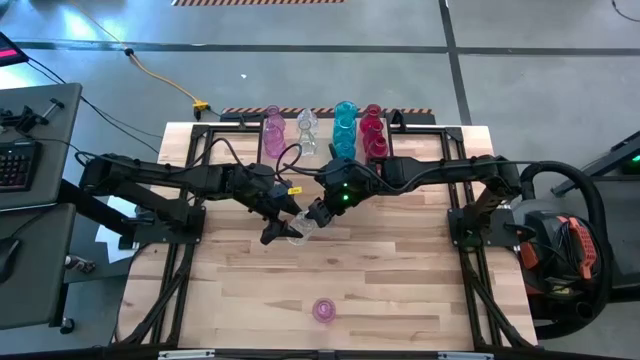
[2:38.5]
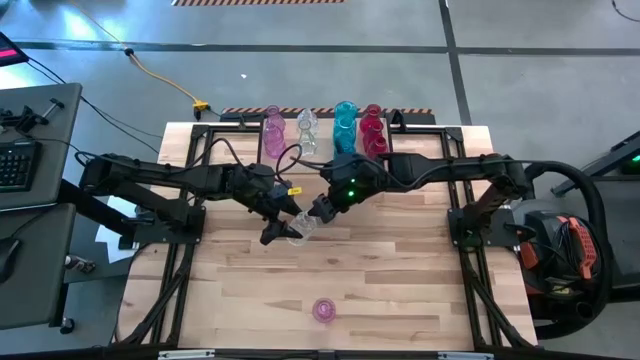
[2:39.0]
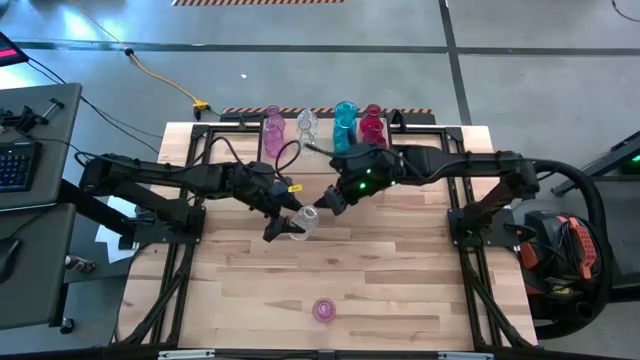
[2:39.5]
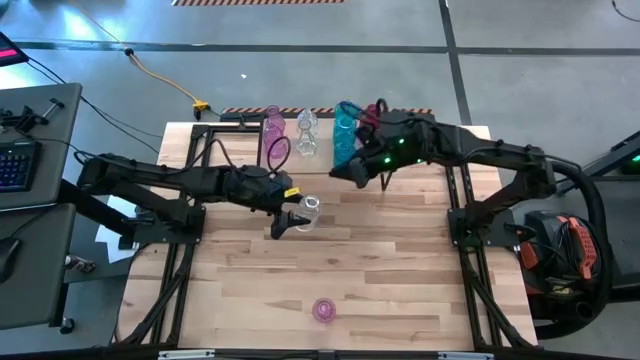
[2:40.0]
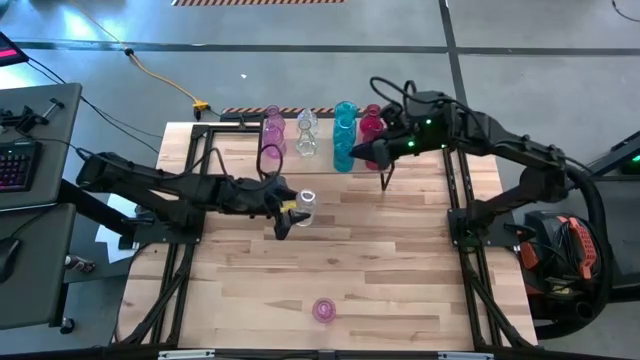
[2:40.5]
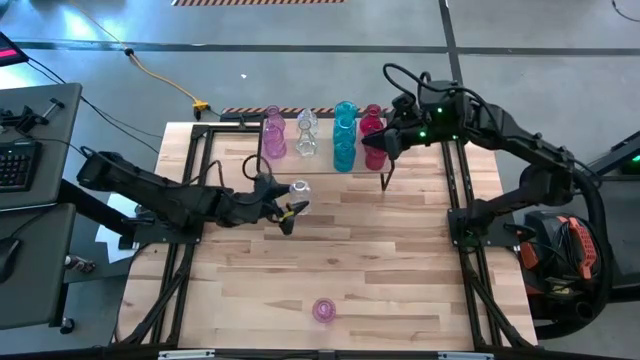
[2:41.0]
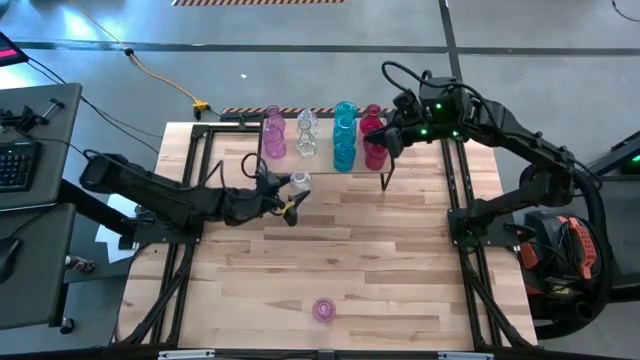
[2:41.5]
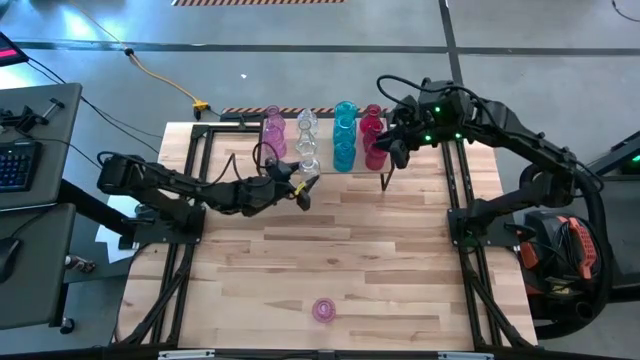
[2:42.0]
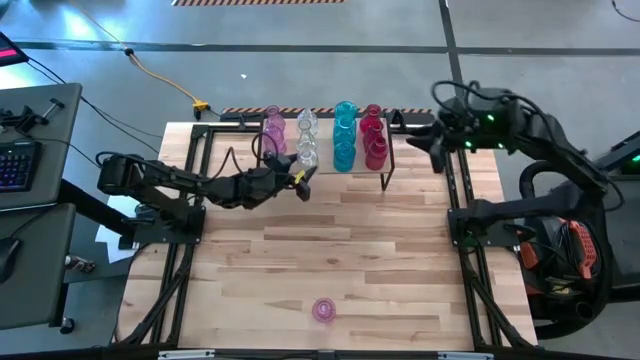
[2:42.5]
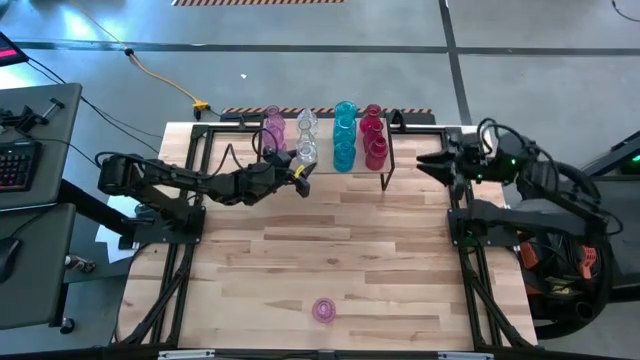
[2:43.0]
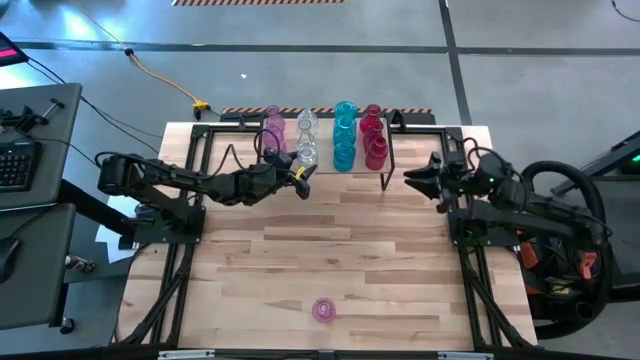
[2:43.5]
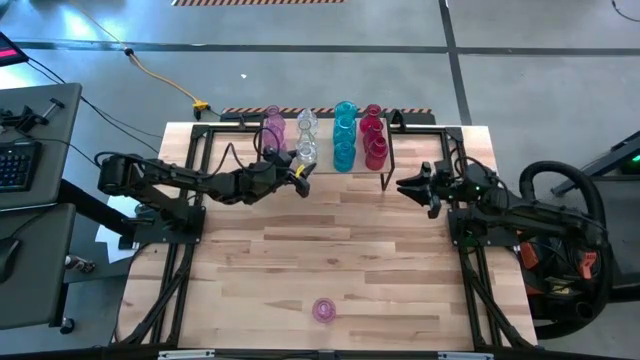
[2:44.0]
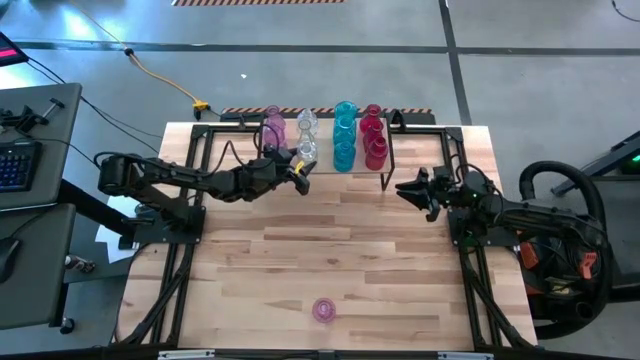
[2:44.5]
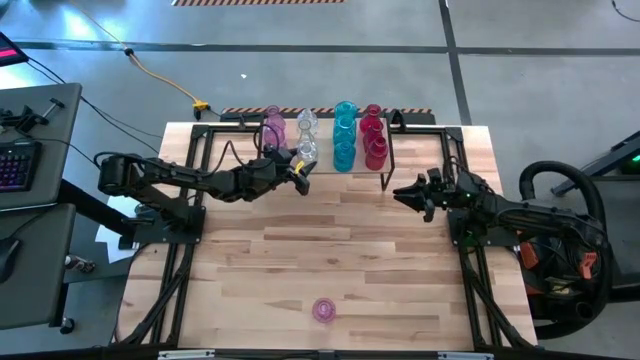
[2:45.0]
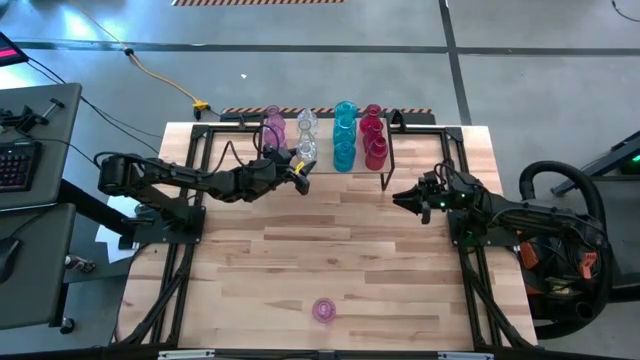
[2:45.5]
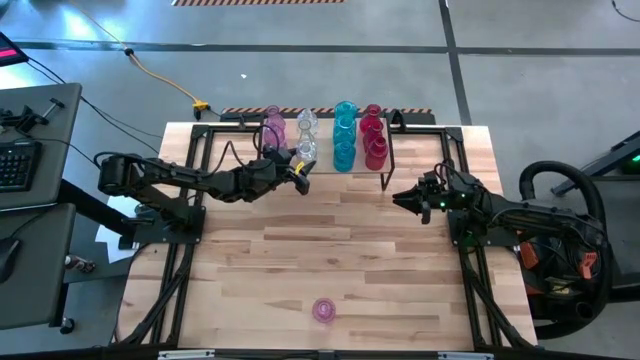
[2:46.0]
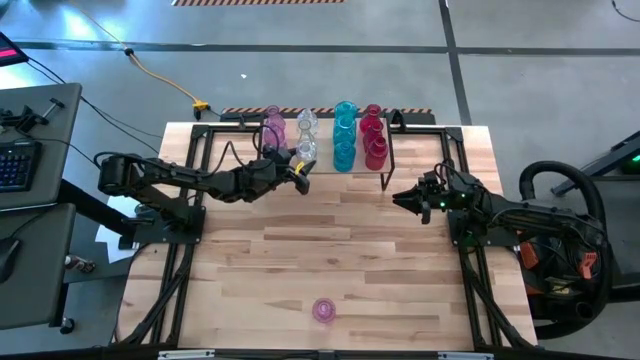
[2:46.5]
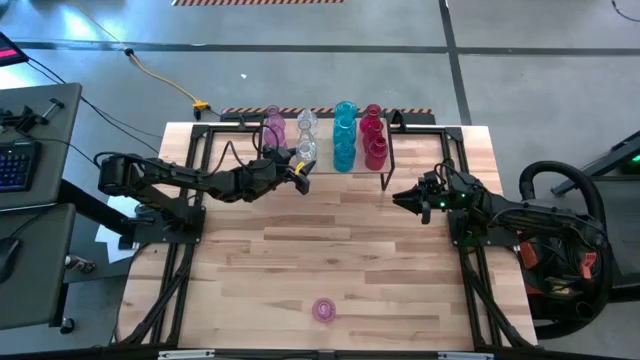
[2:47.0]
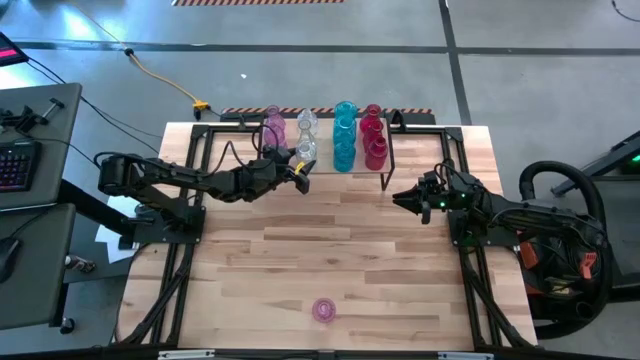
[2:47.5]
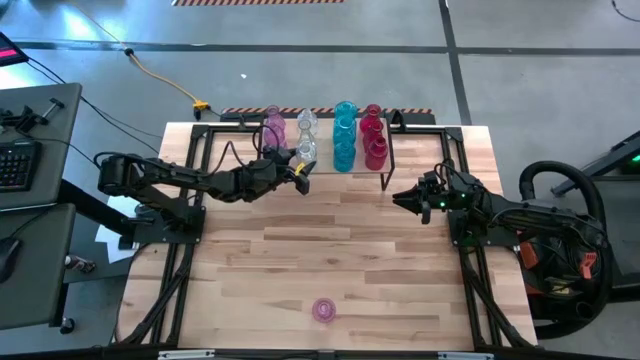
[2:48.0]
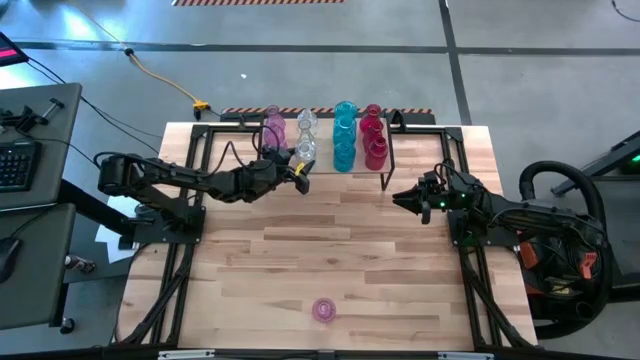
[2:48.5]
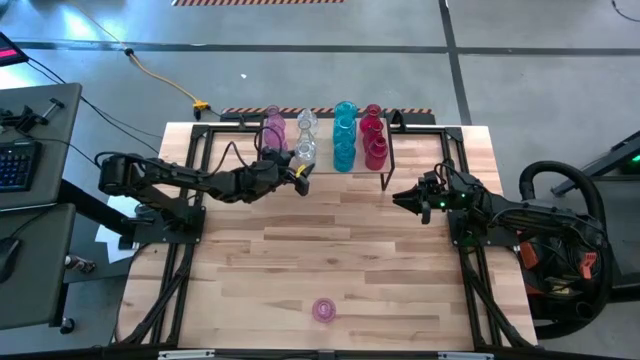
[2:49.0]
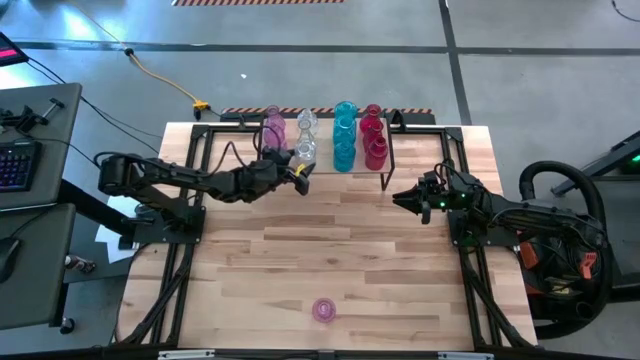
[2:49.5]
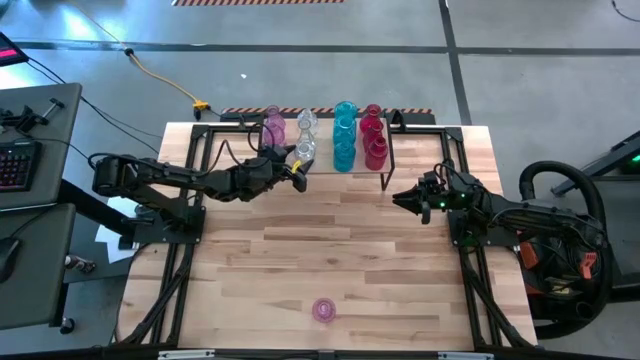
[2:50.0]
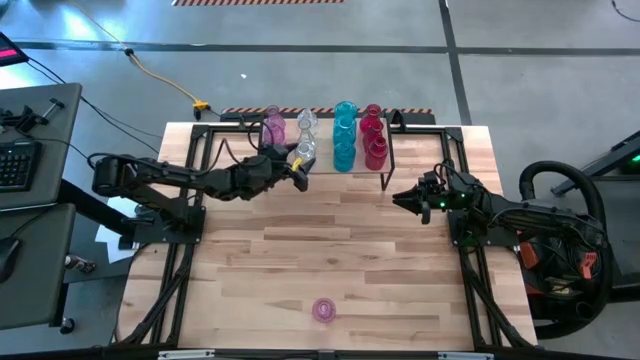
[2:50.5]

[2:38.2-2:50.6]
Task: sort vases onto shelf
Put the transparent vase on the shelf aligned with the other transparent vases

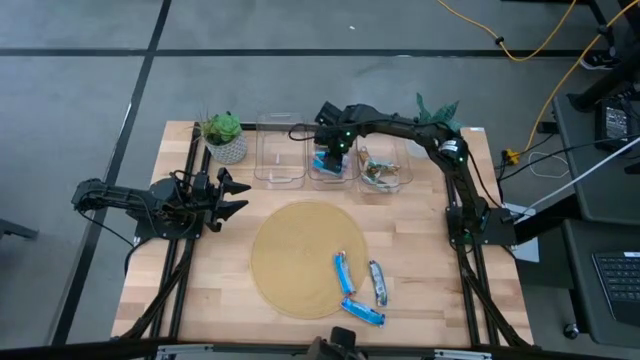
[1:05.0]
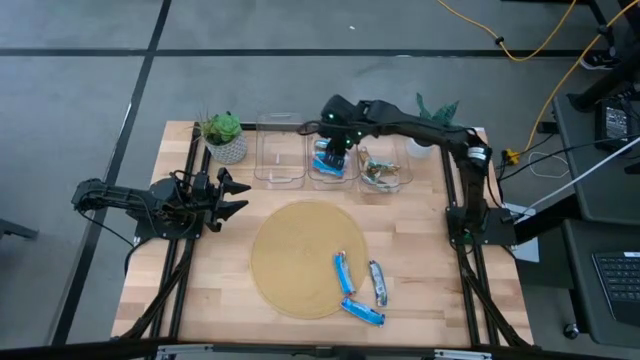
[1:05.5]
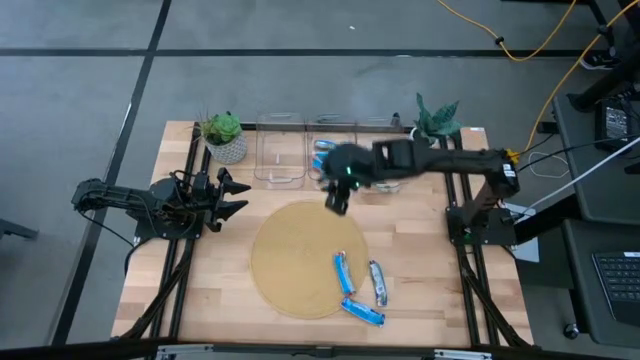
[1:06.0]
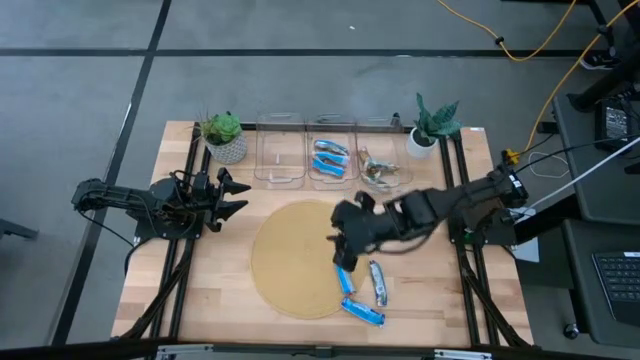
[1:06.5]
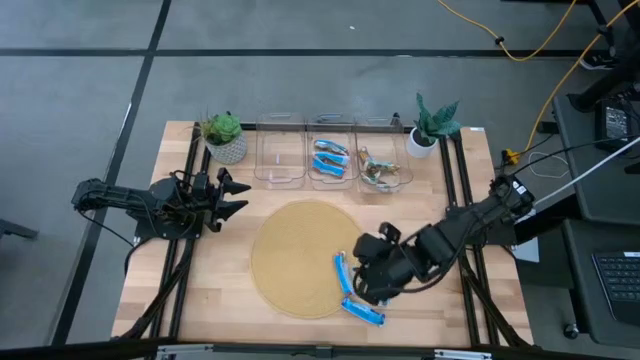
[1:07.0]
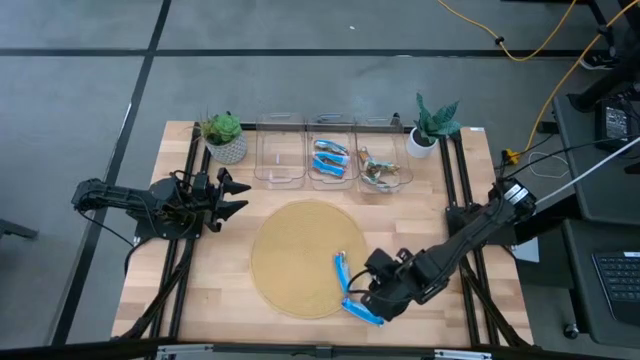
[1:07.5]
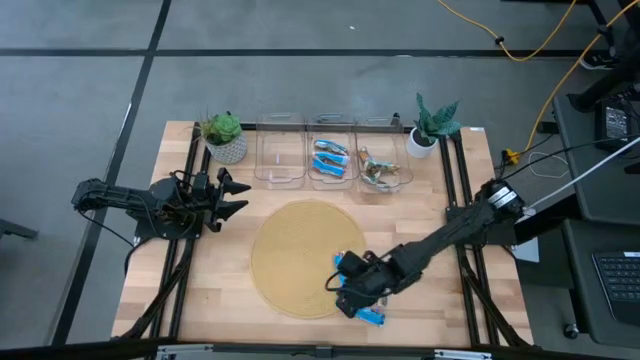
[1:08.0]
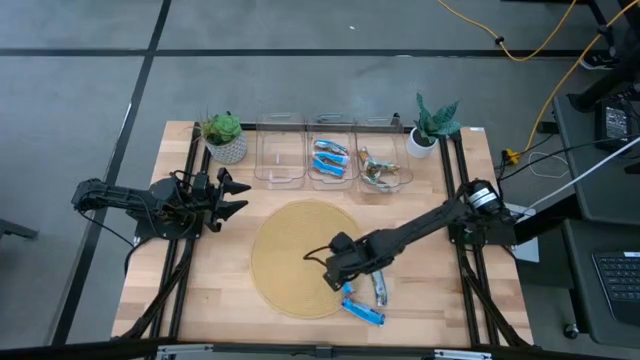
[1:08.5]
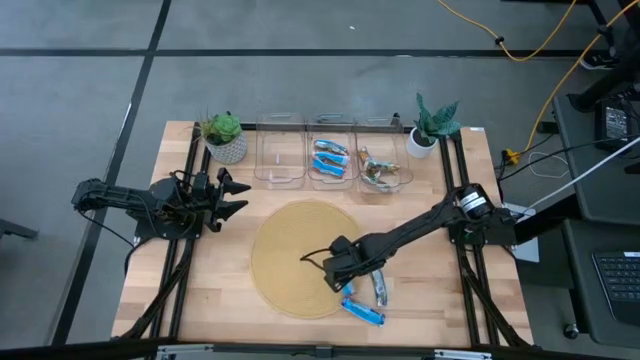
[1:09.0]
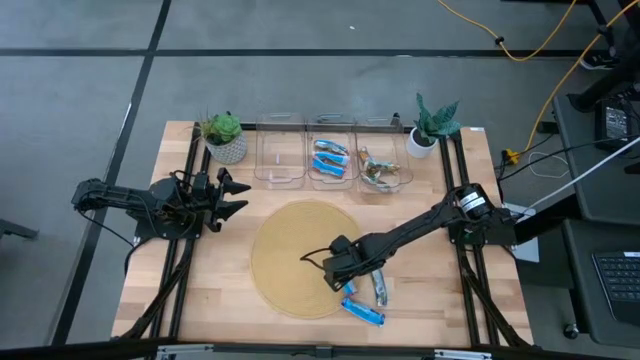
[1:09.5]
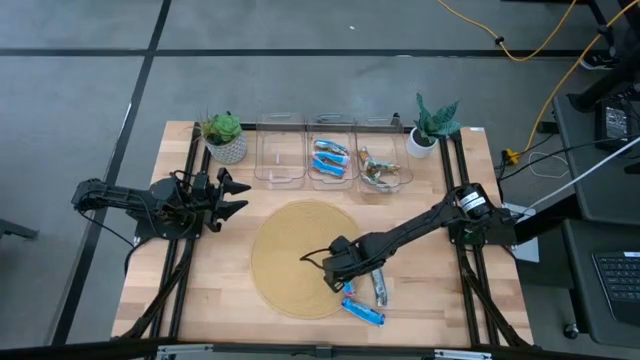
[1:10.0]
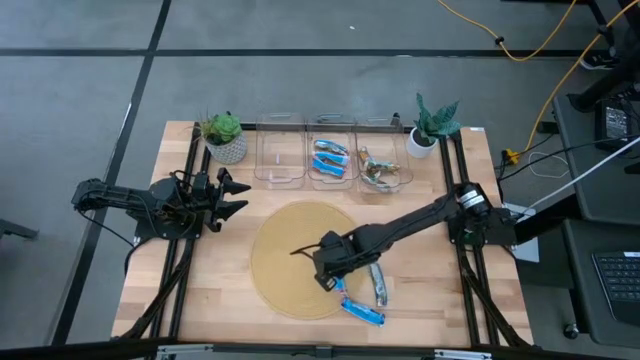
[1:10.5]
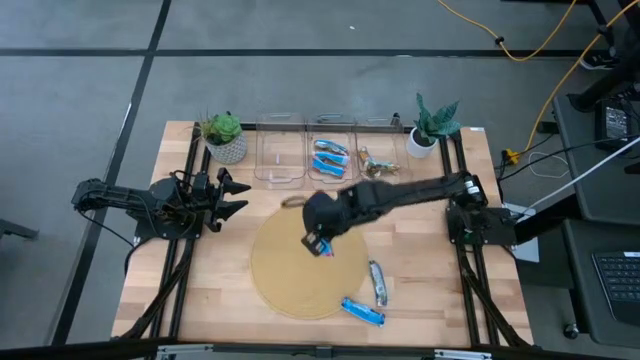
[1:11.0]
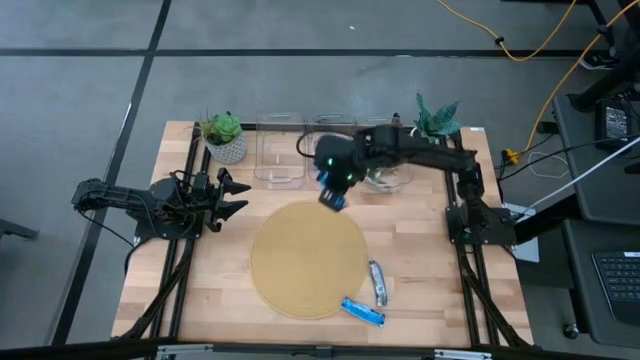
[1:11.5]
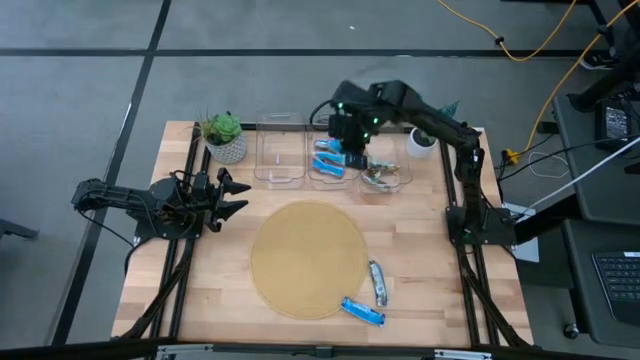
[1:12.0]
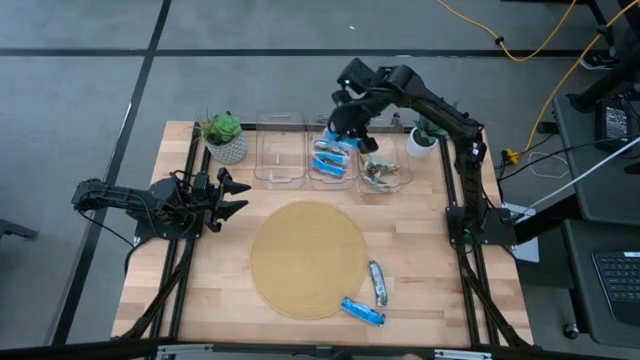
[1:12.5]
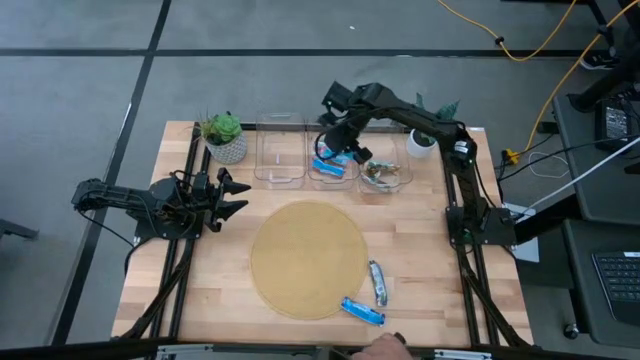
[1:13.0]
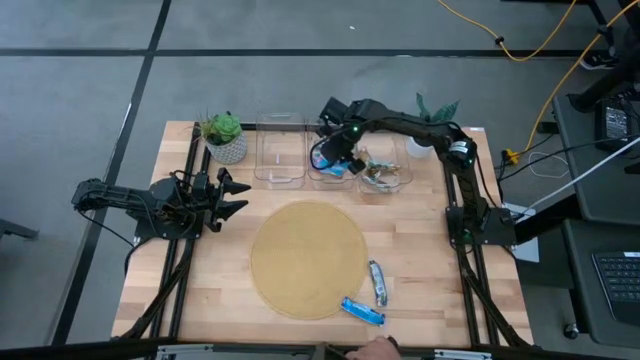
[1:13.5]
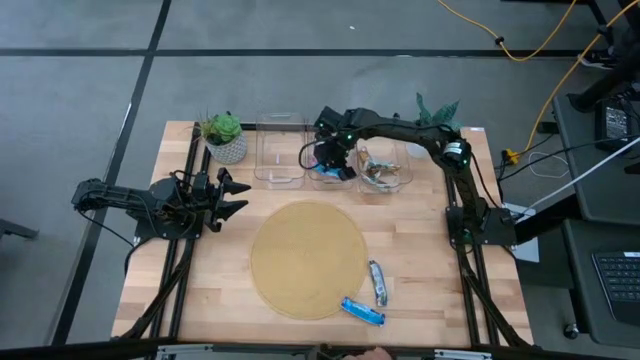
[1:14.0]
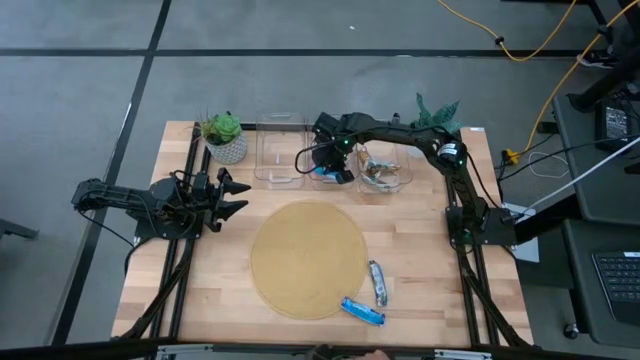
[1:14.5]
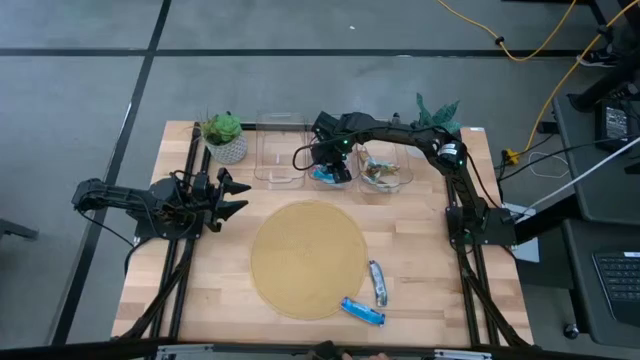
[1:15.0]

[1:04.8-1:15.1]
Task: Pick and place Granola Bars by type
Put the red granola bar into the right transparent bin
